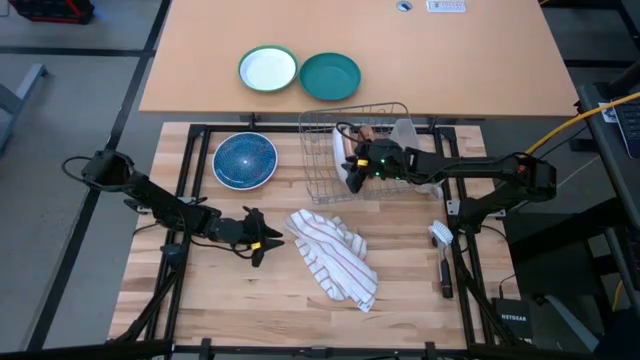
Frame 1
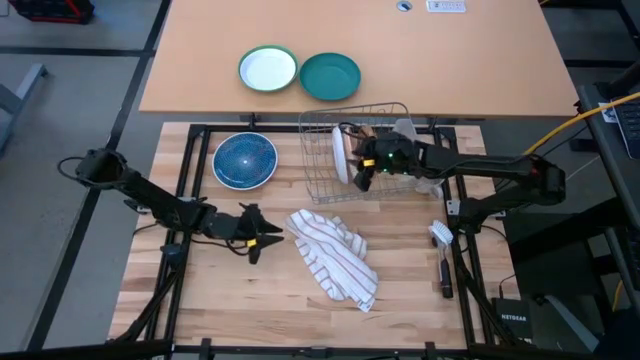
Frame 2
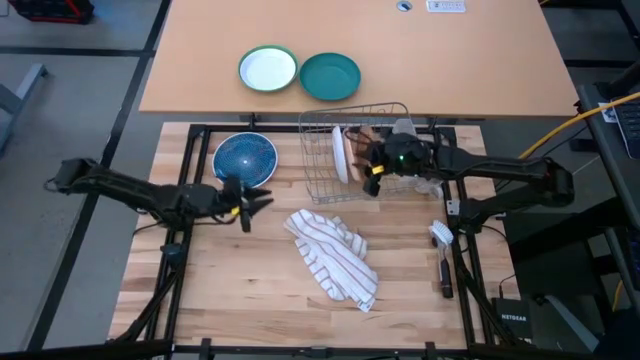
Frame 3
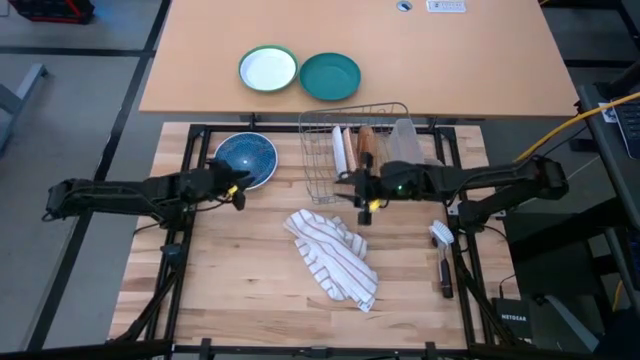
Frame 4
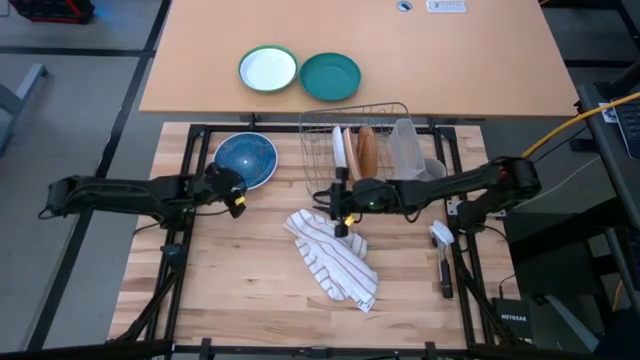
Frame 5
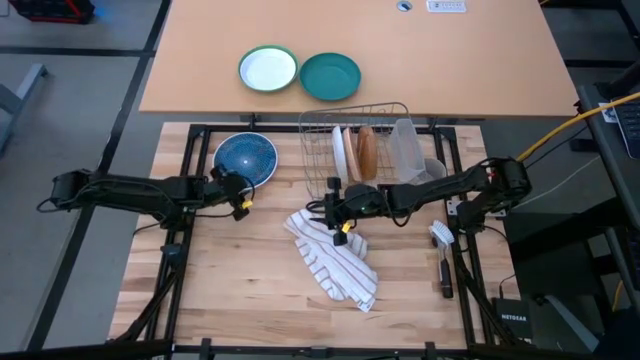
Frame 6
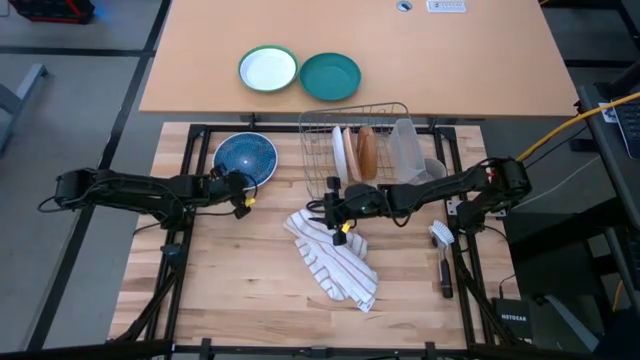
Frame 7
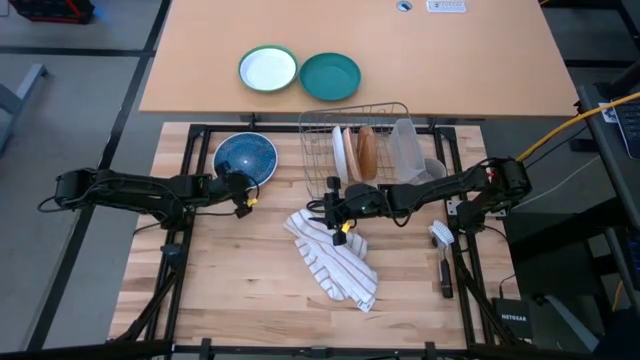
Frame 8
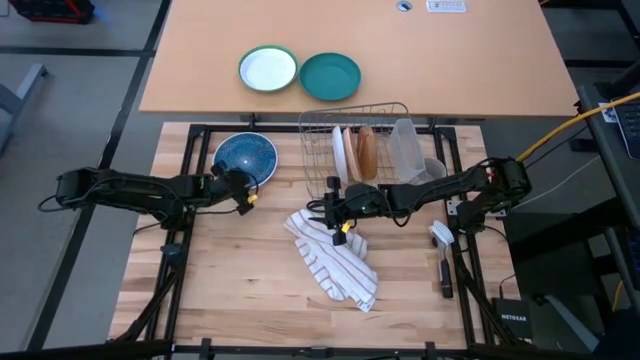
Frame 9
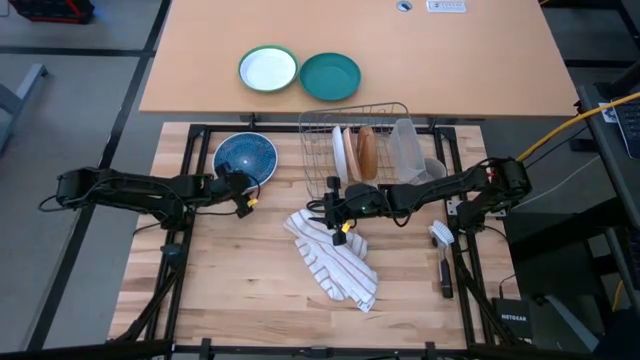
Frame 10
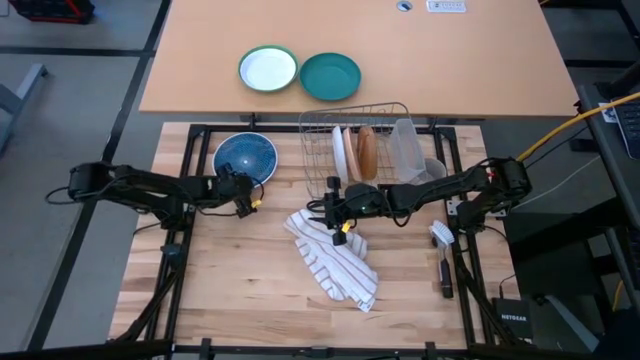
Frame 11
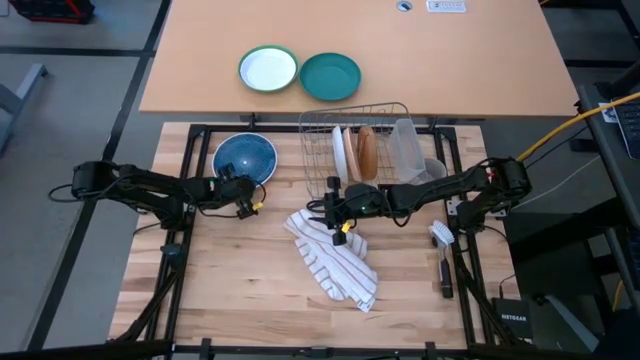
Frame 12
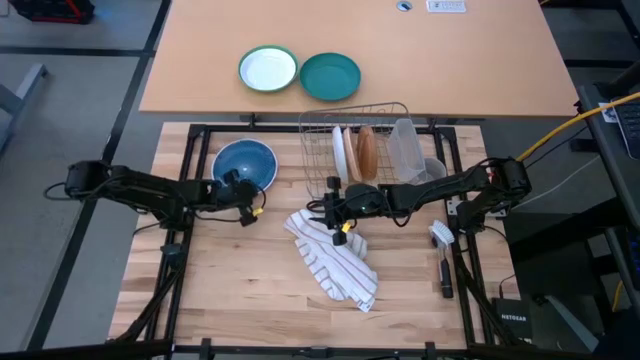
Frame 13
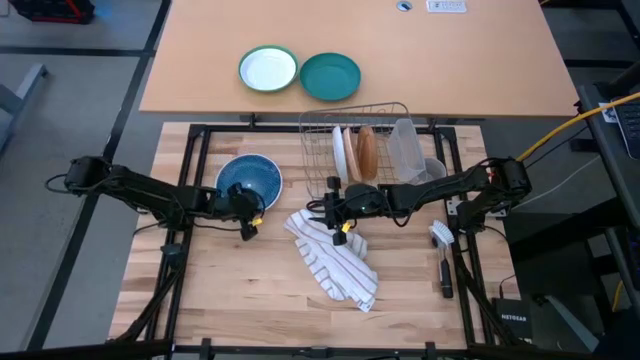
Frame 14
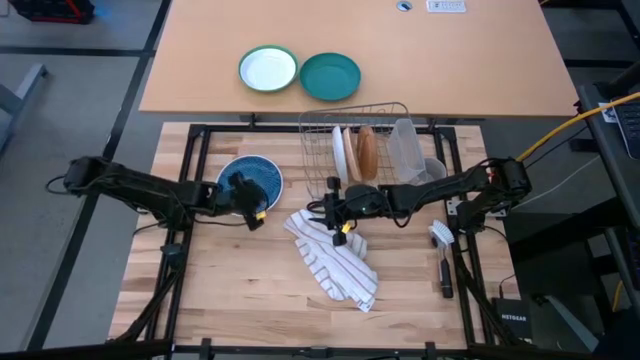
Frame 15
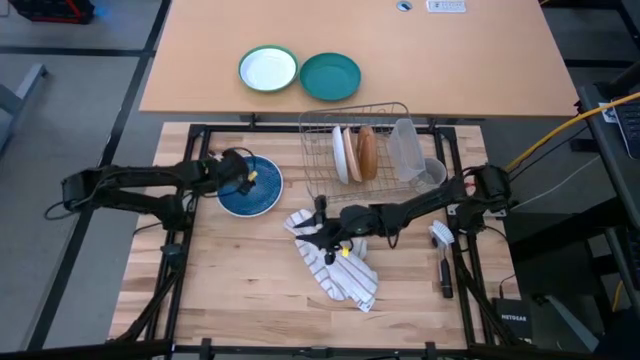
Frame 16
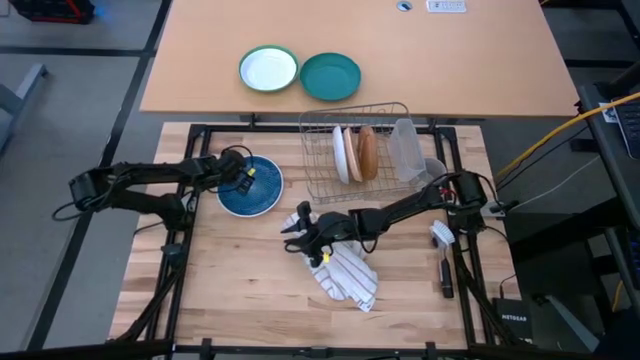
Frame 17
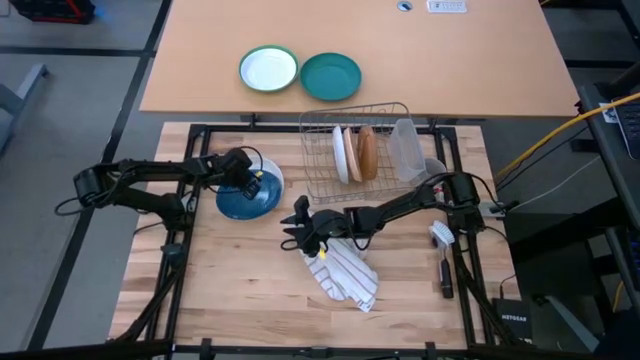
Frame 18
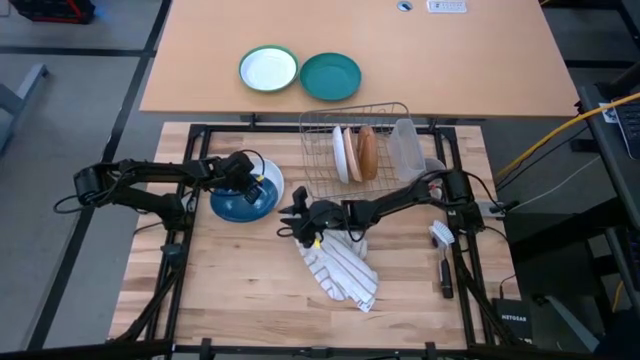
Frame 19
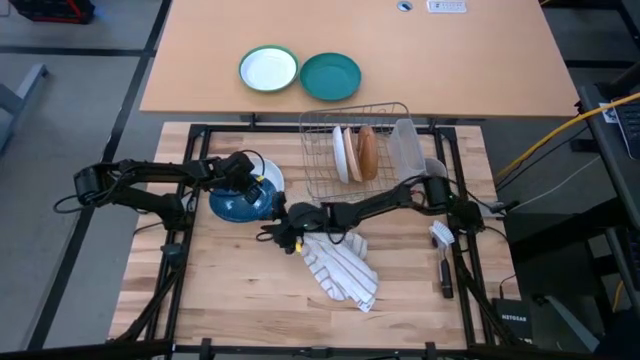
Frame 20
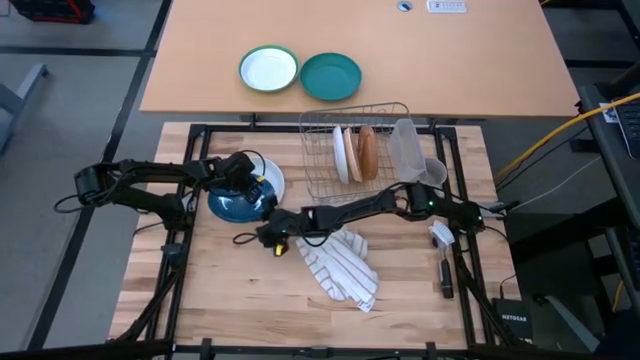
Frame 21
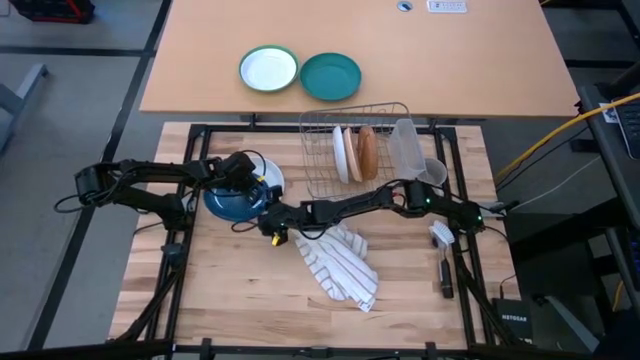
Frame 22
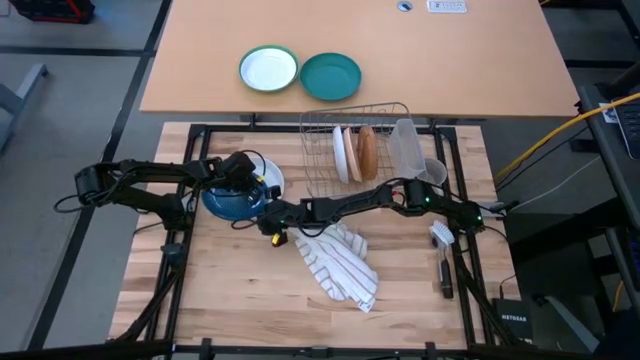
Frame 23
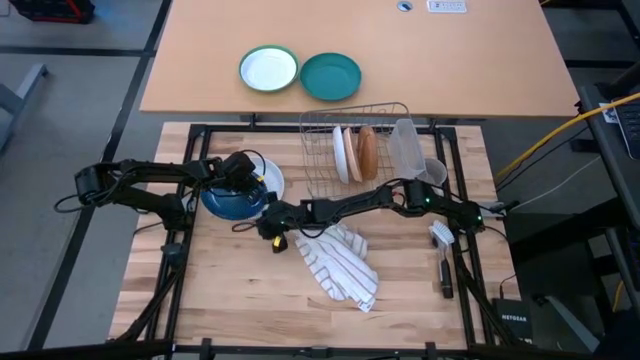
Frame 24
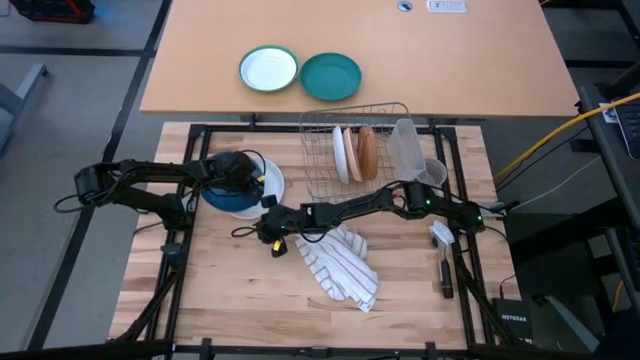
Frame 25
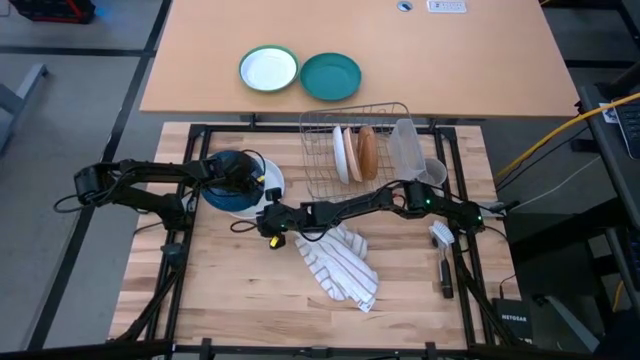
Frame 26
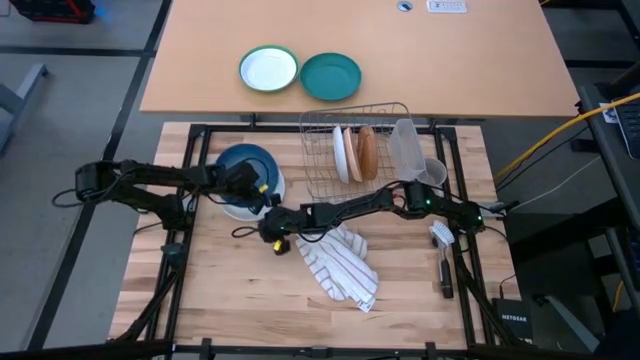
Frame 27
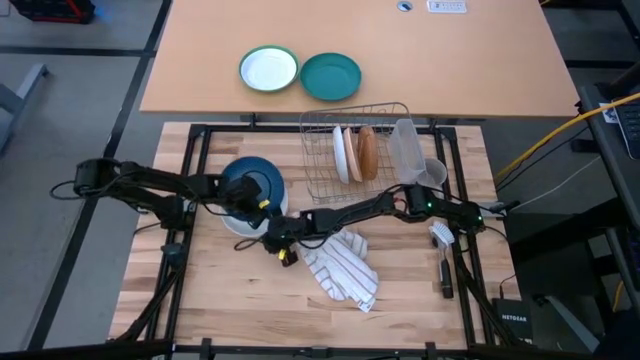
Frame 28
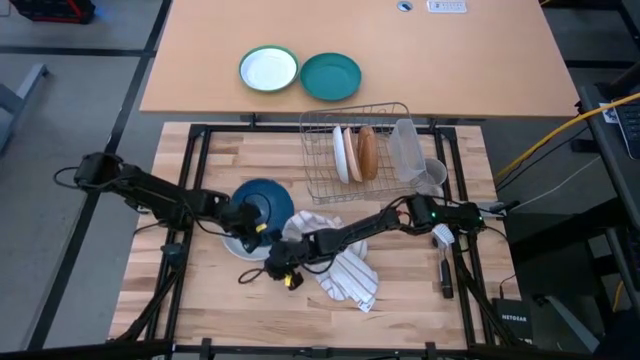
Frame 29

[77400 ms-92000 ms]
Task: Sort dishes
Put the blue plate into the dish rack

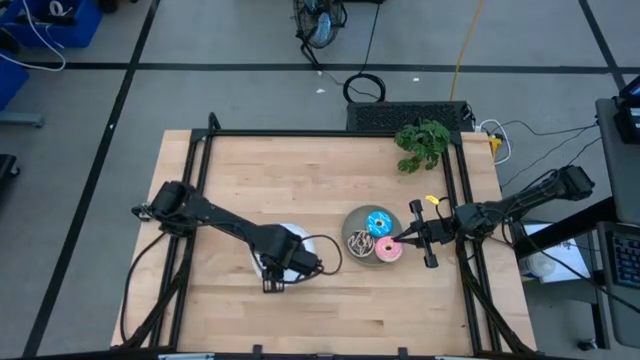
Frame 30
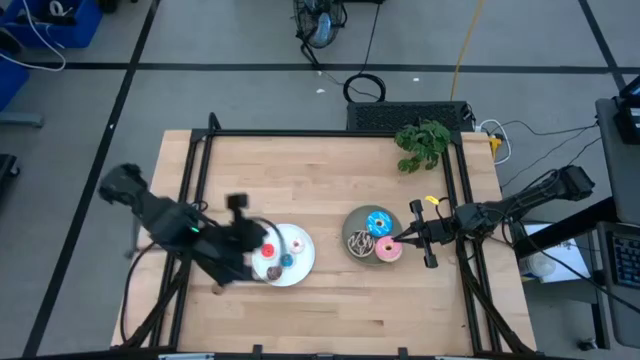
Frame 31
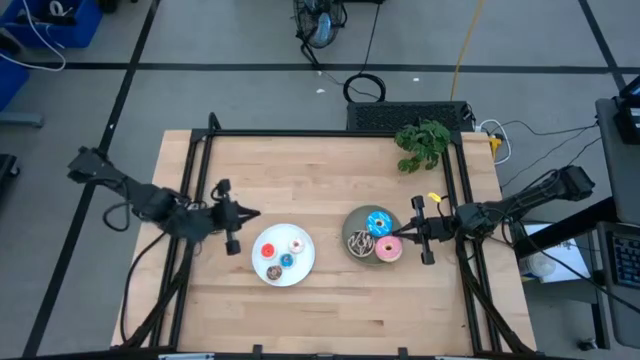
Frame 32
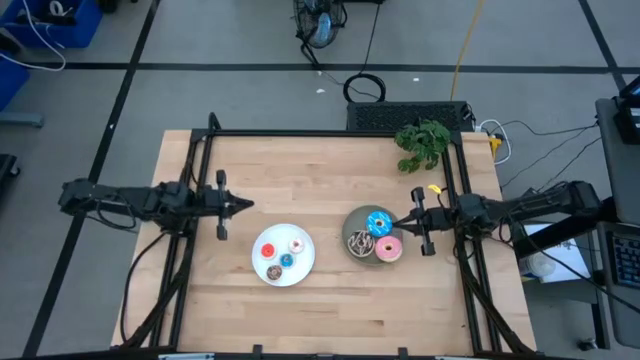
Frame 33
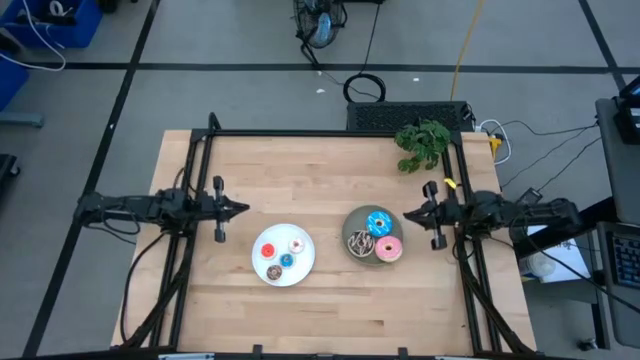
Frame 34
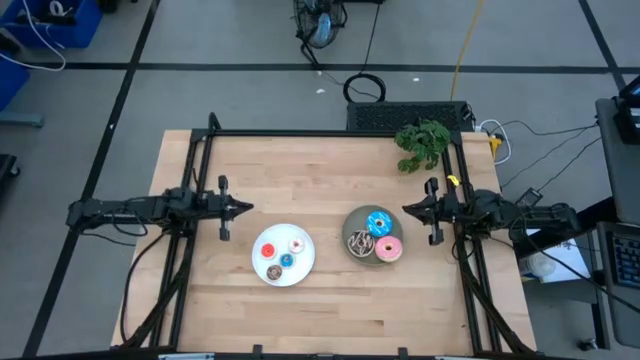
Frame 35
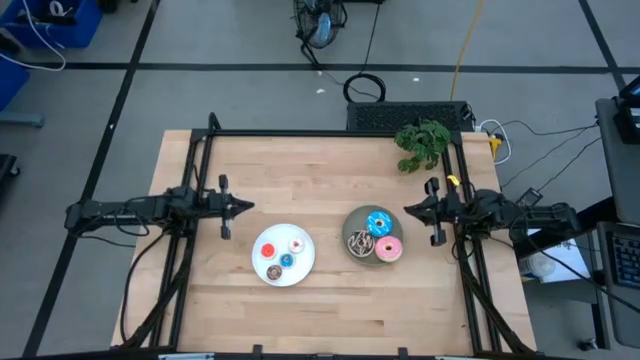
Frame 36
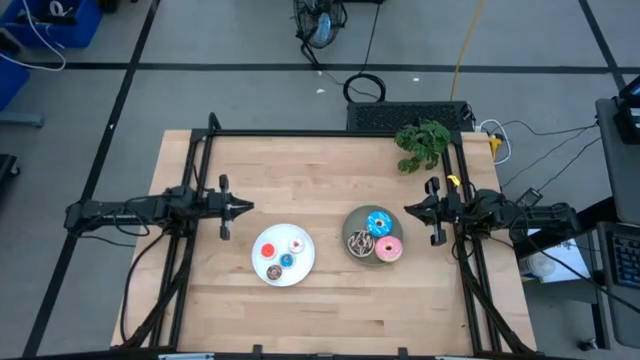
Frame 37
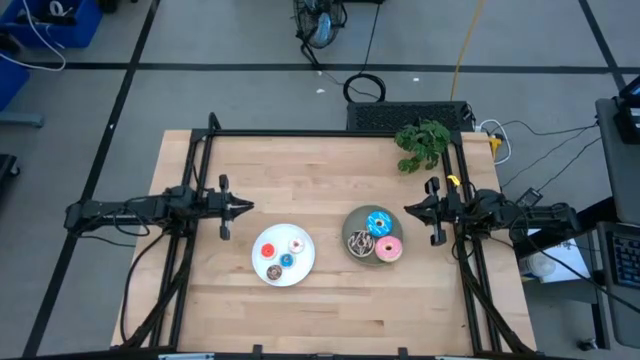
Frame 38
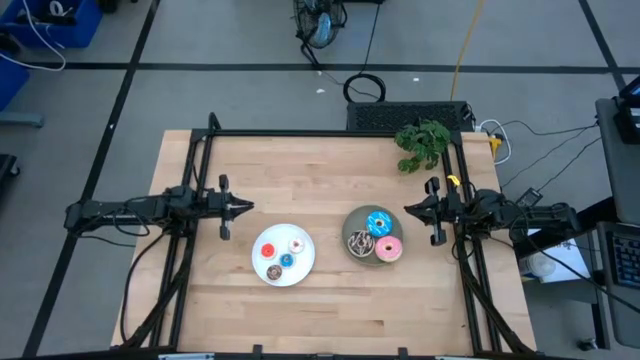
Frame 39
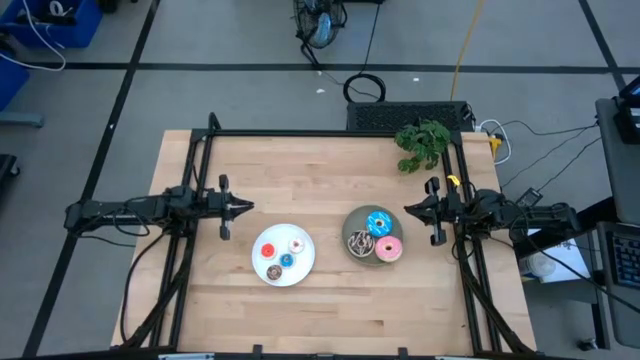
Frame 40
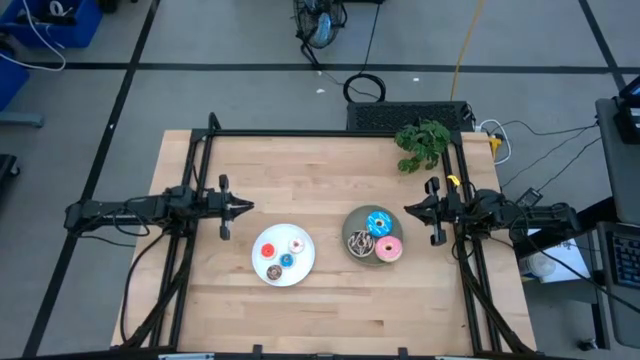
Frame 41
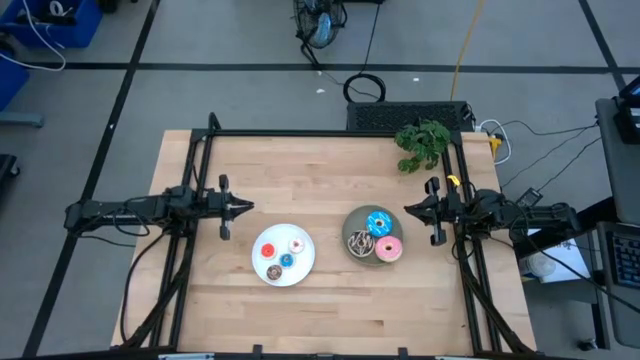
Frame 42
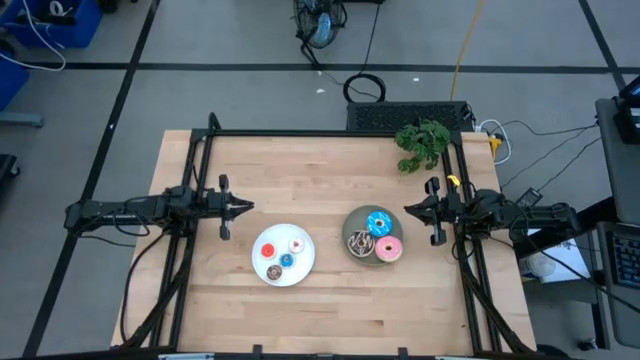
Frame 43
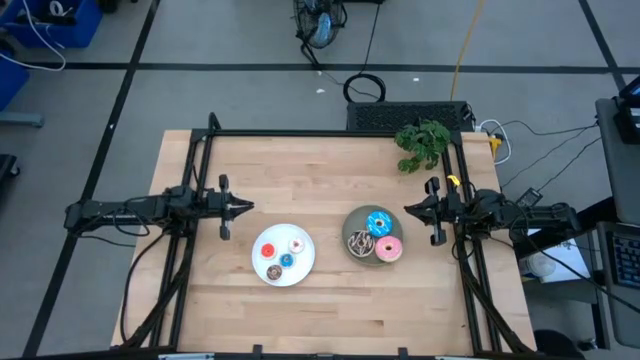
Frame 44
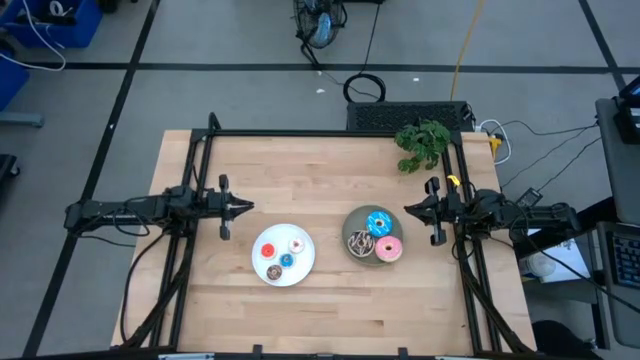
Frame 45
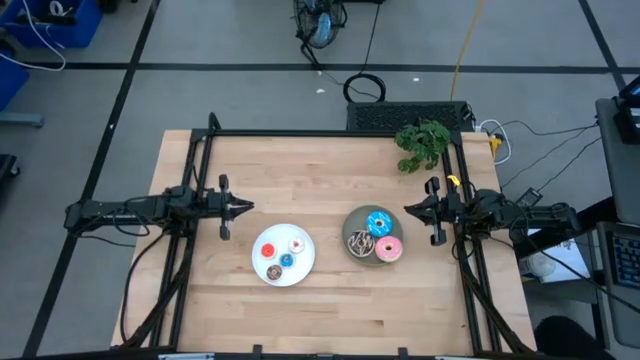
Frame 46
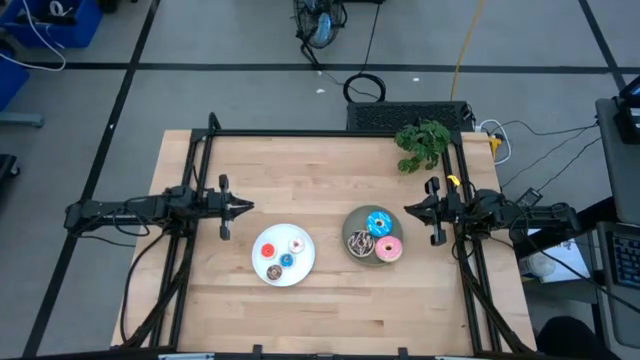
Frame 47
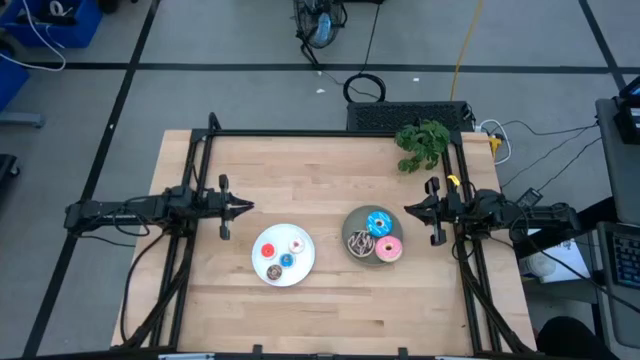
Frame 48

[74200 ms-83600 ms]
Task: Pick & Place donuts
Return to Home Position
